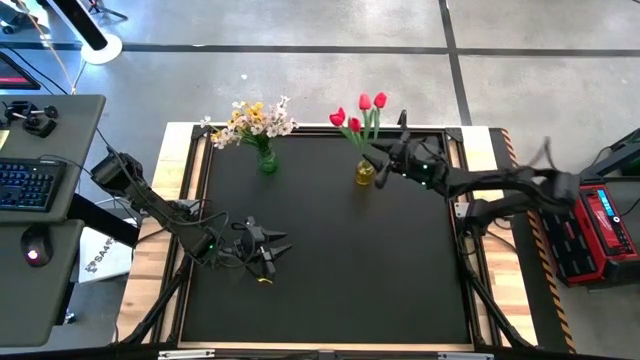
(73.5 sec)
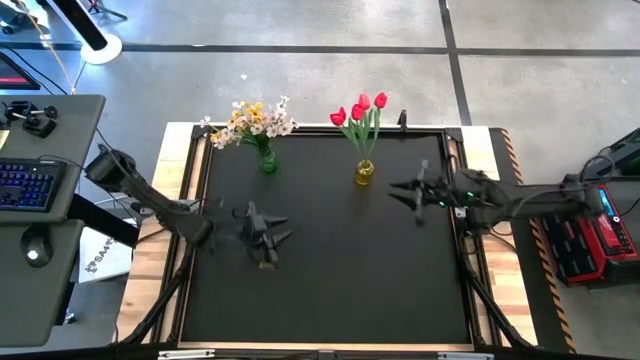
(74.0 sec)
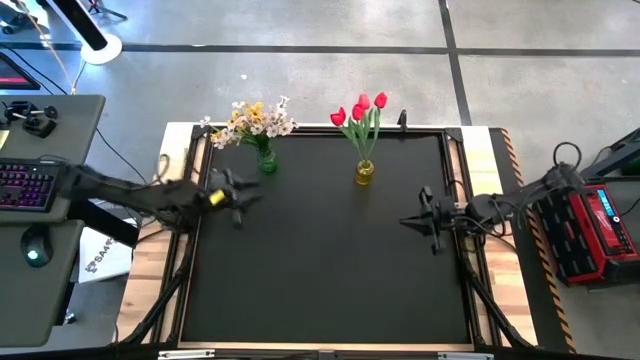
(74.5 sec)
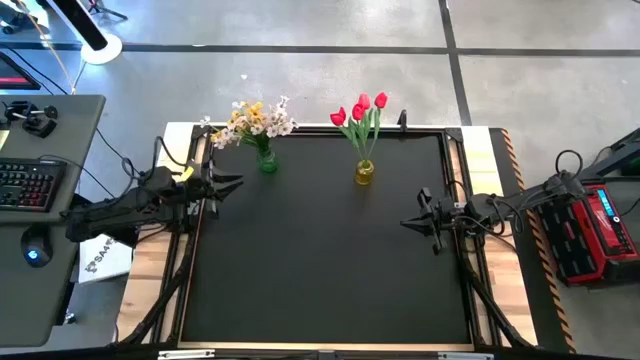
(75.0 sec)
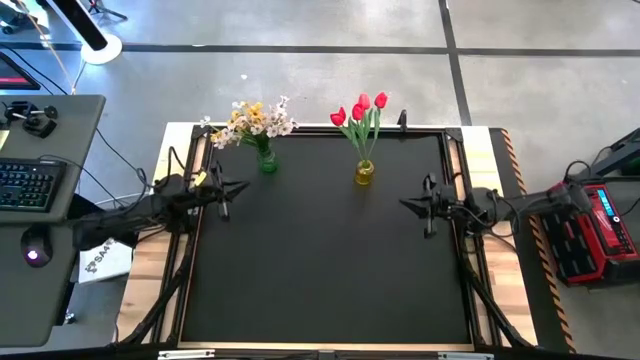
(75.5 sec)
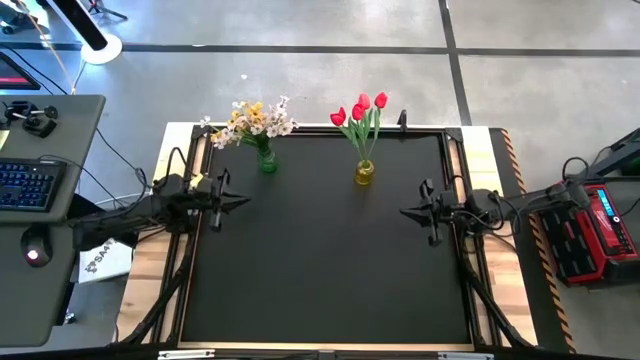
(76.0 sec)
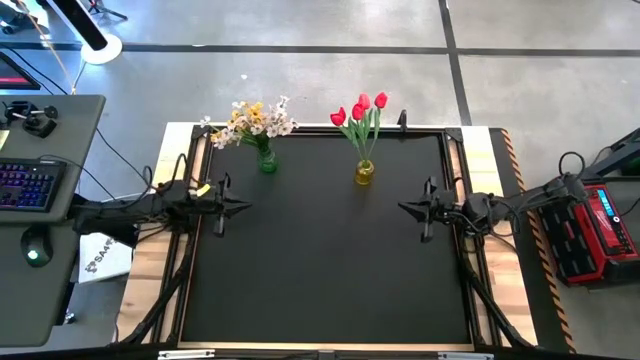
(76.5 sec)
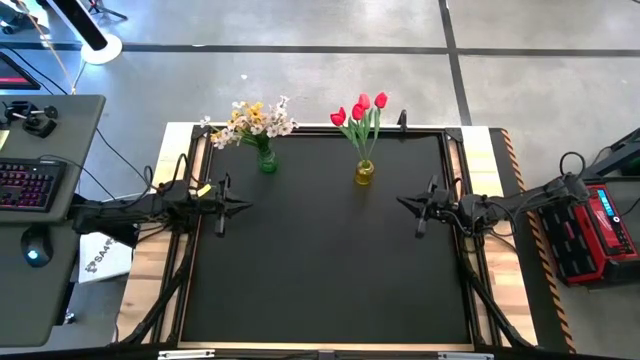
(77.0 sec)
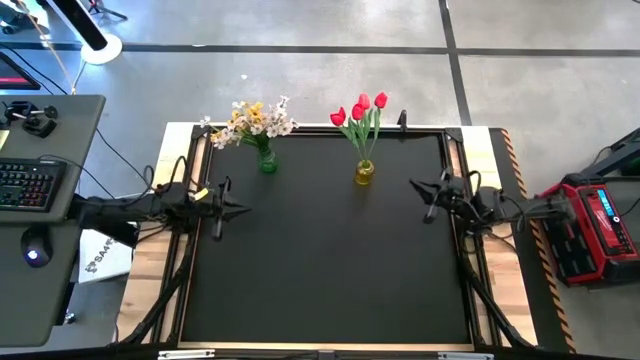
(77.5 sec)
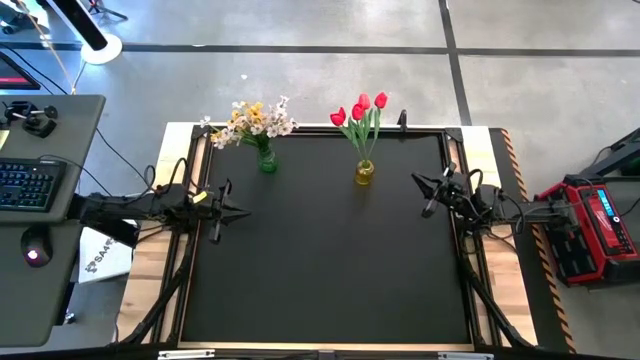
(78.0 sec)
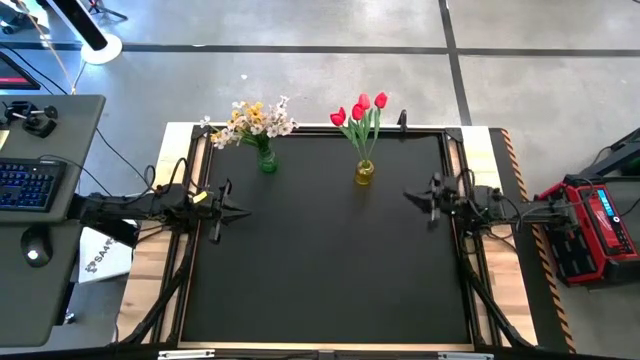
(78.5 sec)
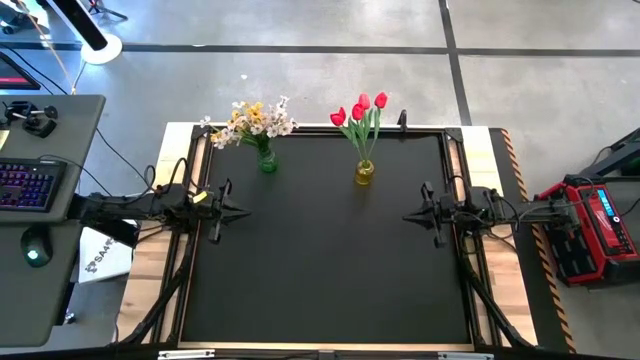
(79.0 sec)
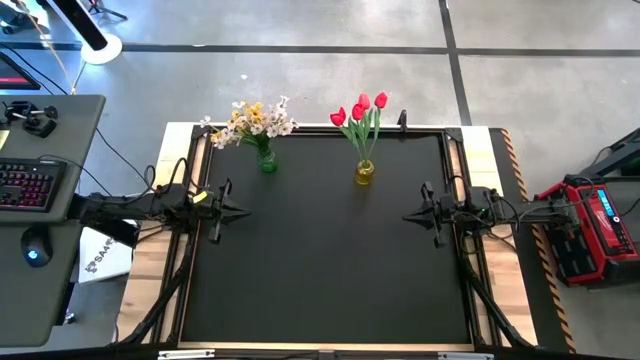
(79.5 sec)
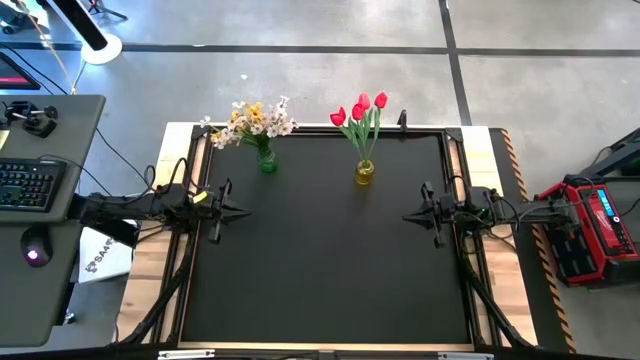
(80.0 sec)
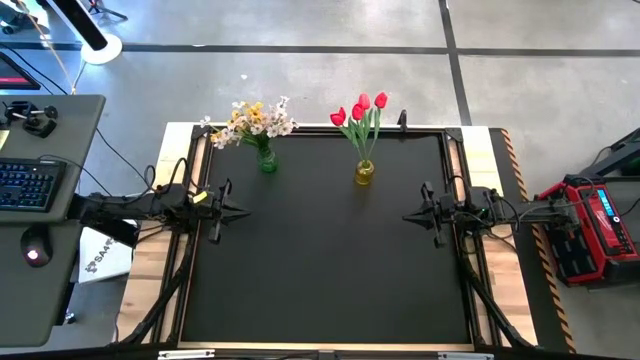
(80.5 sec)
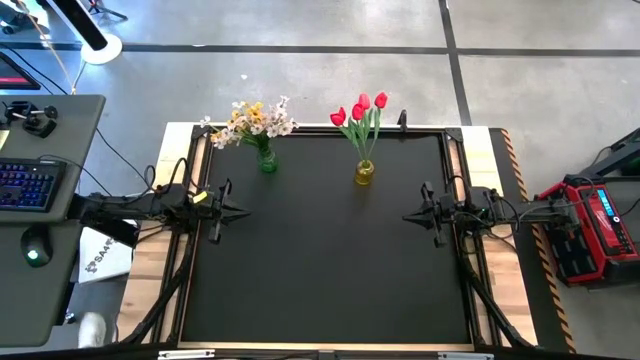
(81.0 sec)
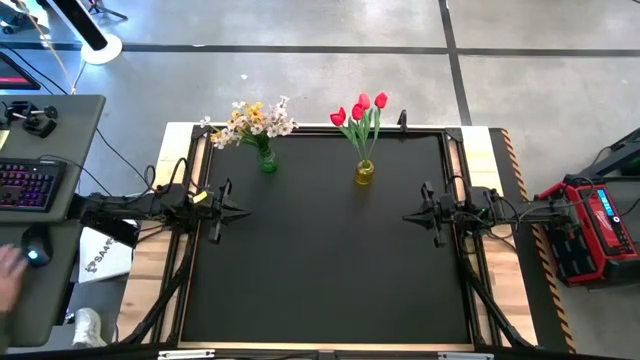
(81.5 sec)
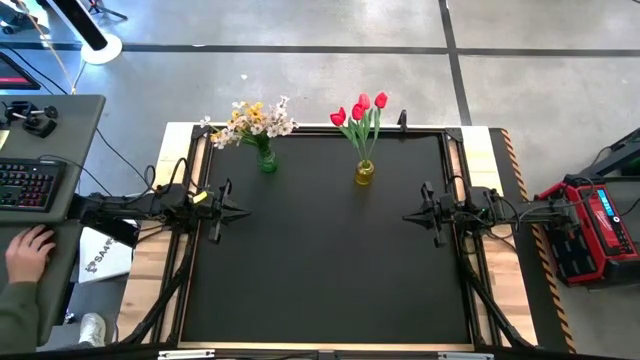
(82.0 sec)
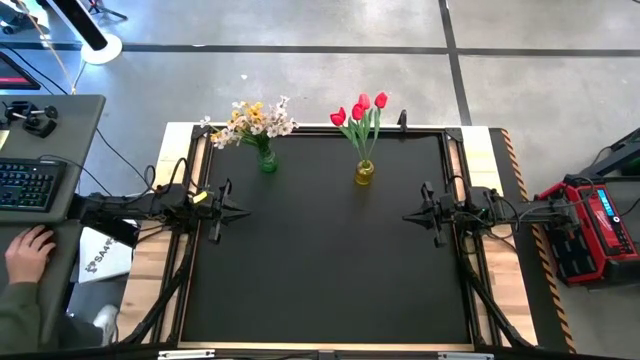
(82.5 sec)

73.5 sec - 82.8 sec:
Task: Sort flowers into vase by color
Return to Home Position

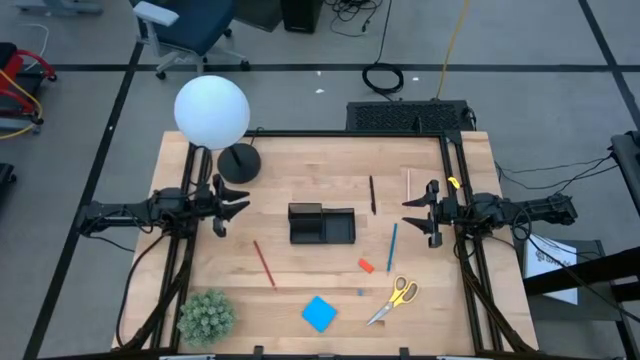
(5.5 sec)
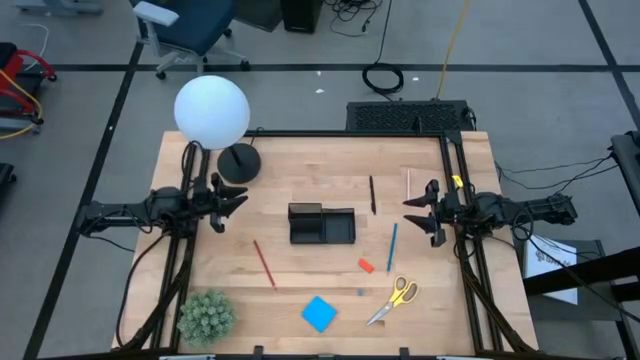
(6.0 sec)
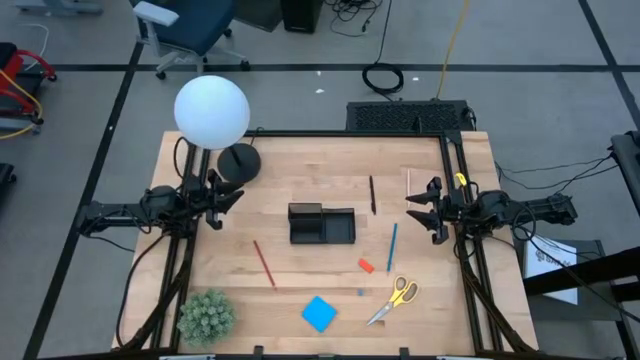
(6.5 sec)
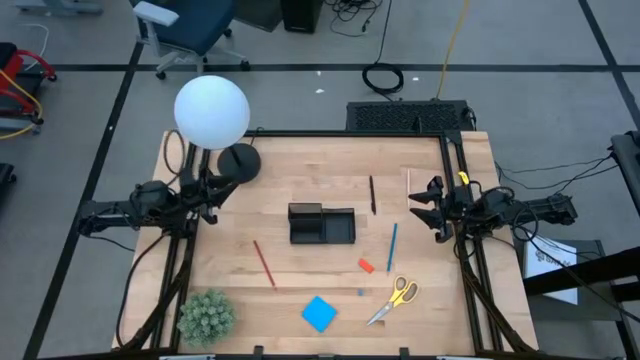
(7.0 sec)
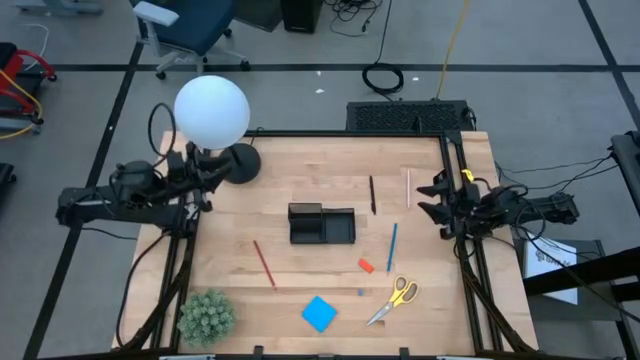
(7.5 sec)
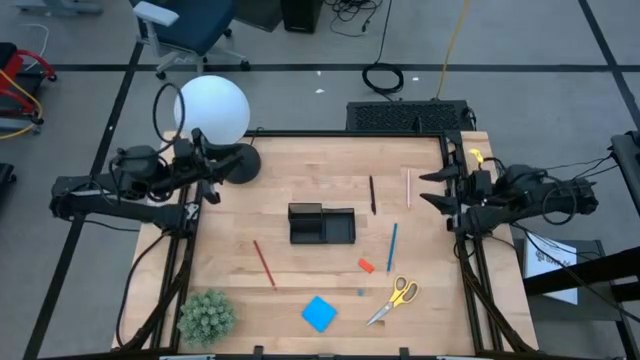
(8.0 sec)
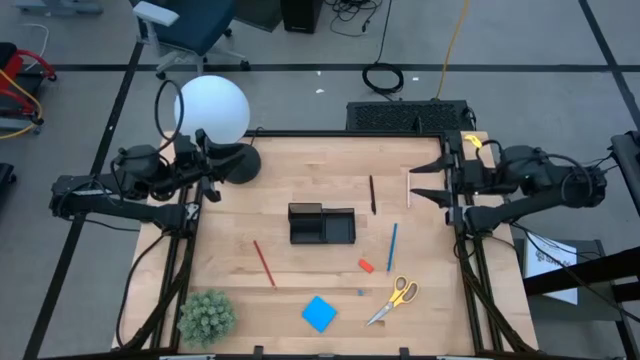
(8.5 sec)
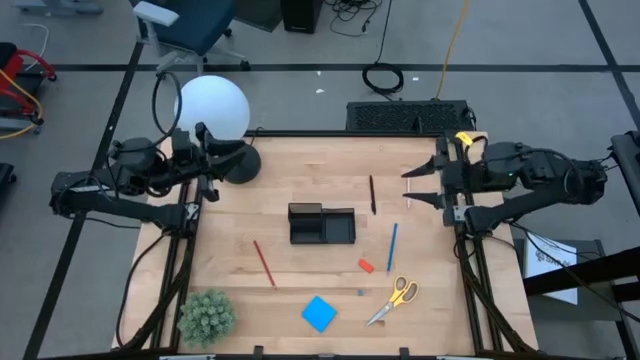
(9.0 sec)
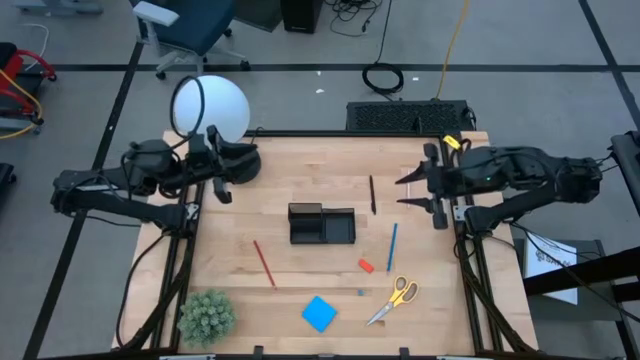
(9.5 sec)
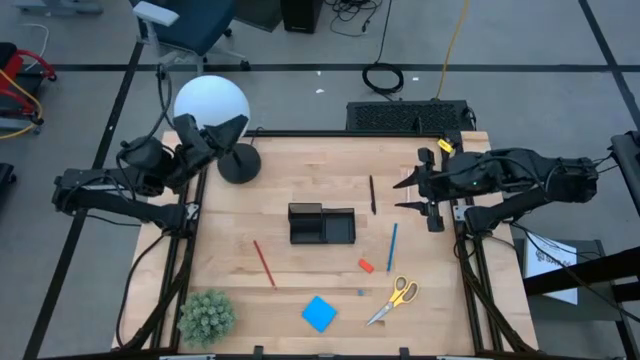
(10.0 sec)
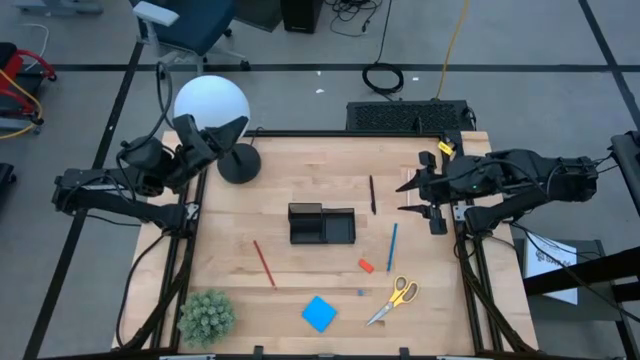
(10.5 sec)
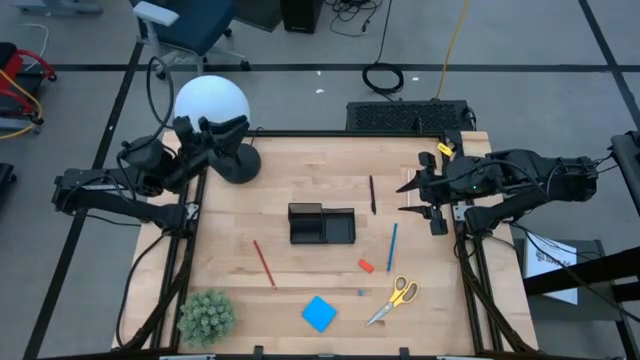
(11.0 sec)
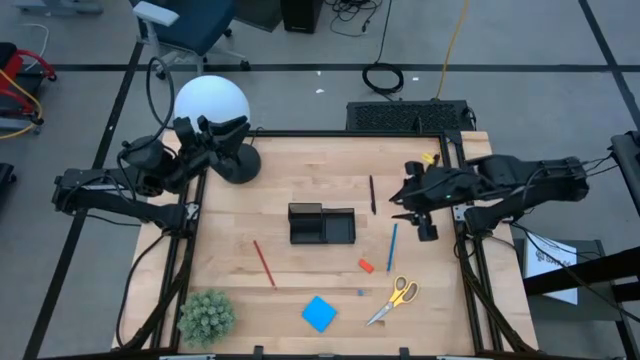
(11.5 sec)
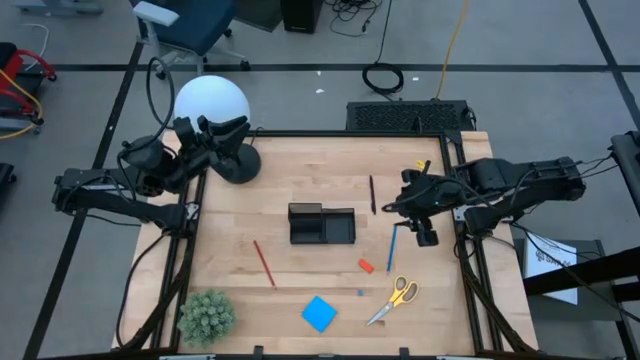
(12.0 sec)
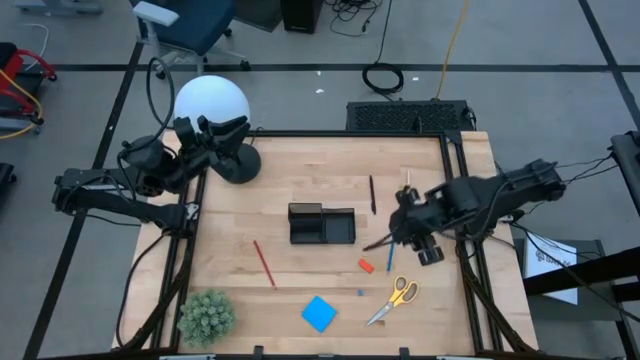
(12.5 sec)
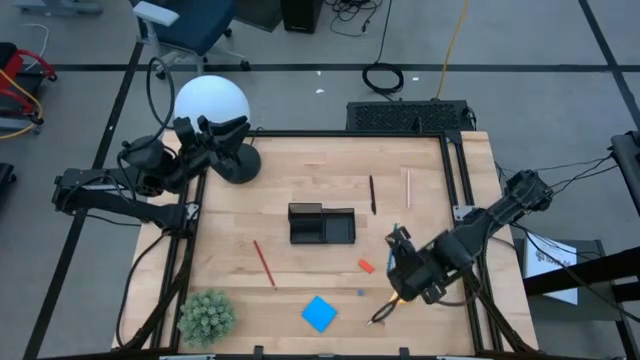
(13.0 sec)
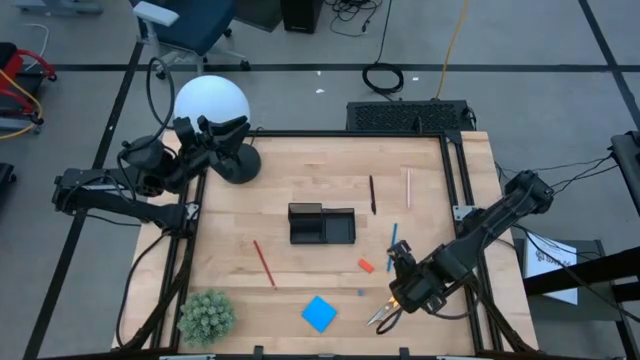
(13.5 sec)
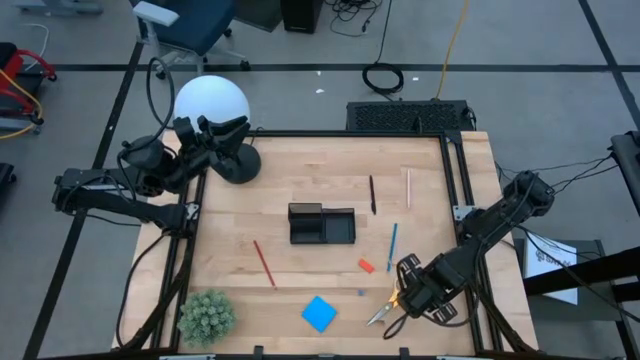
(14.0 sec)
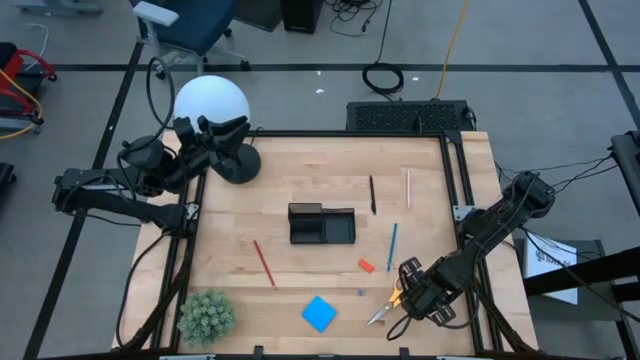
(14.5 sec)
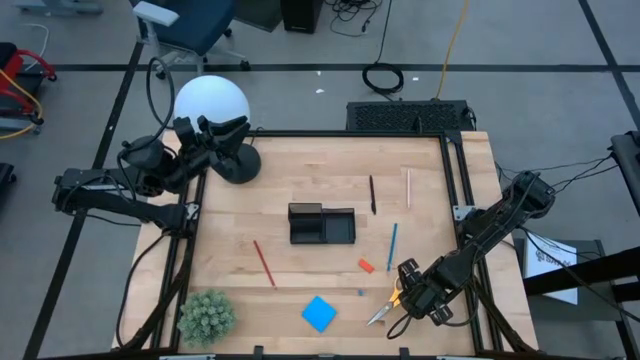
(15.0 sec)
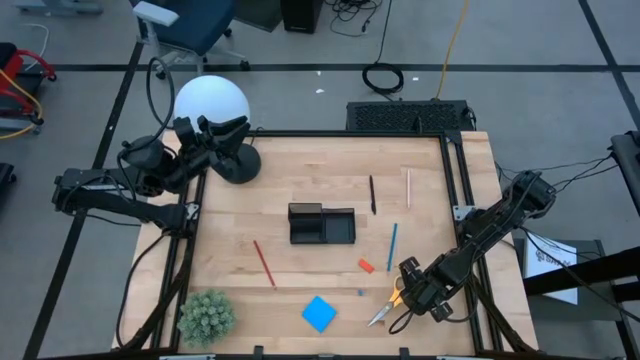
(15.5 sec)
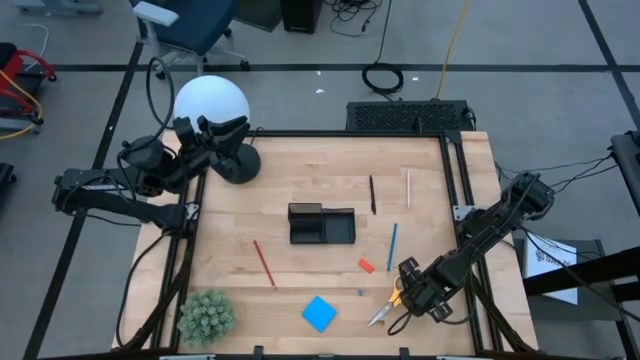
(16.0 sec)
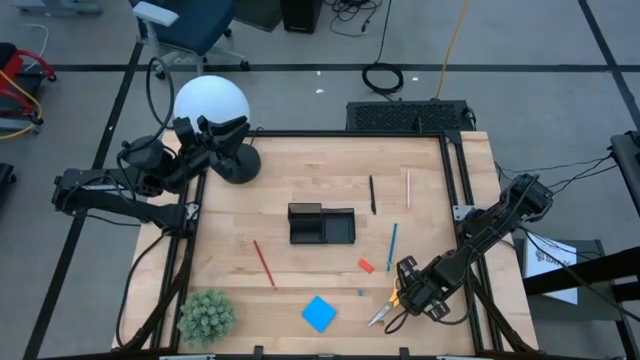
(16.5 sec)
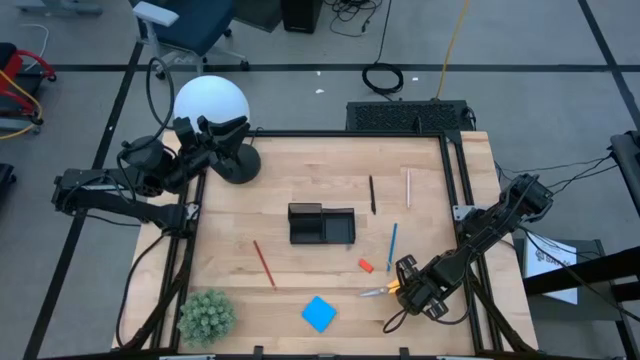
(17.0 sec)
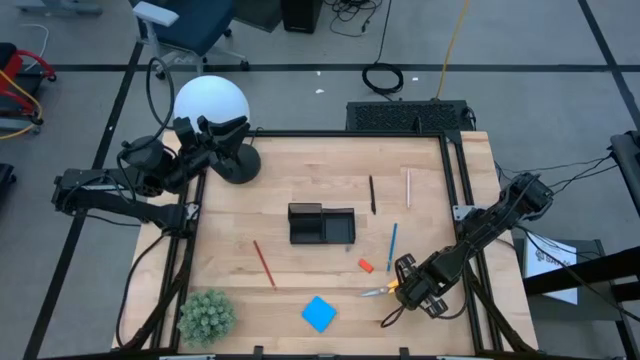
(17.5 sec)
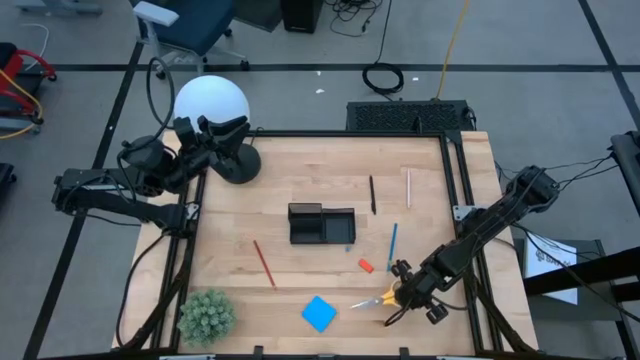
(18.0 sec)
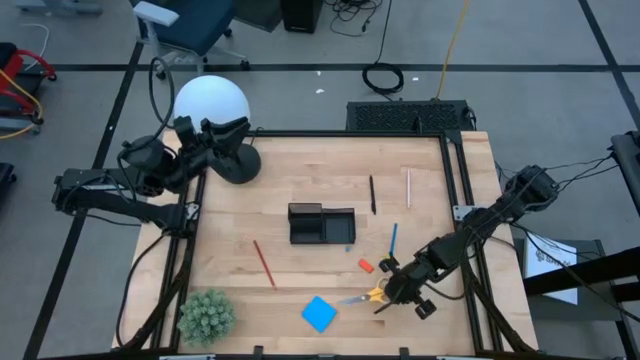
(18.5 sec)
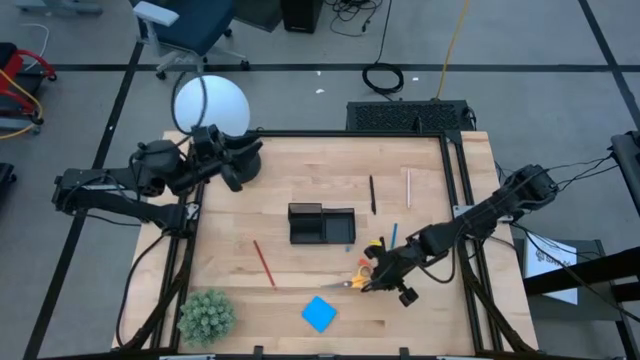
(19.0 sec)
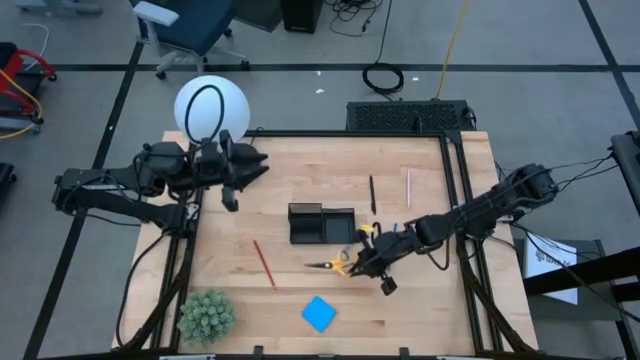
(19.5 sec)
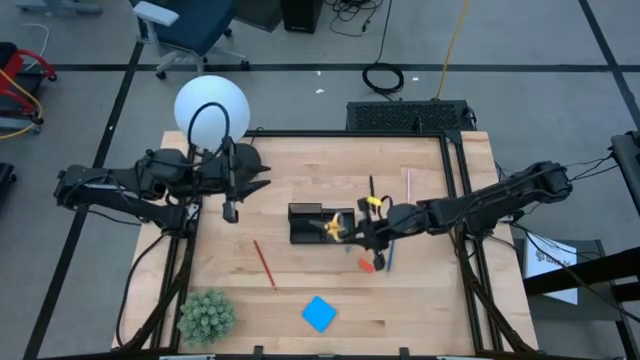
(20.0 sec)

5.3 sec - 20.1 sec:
Task: Pick and place office supplies into organizer
Put the yellow scissors into the desk organizer
